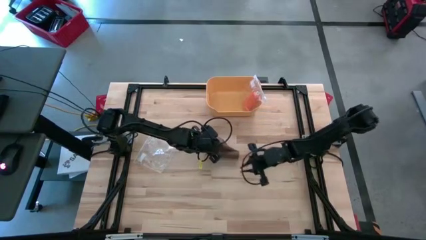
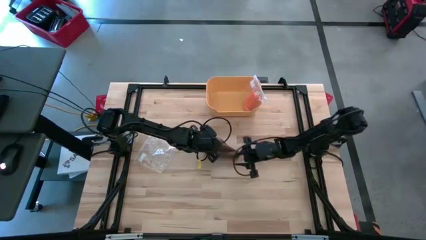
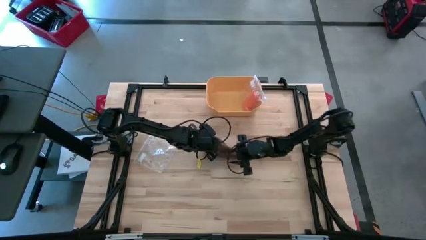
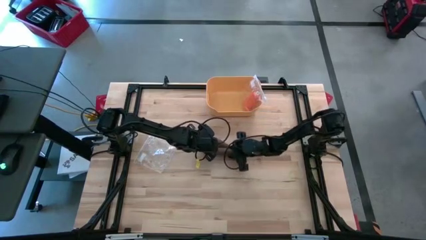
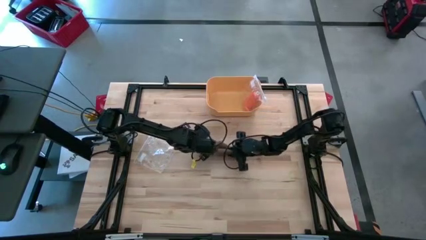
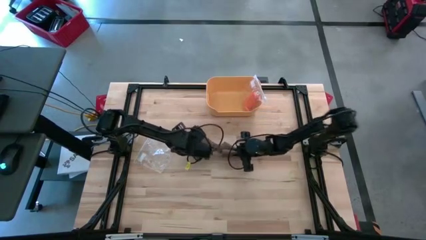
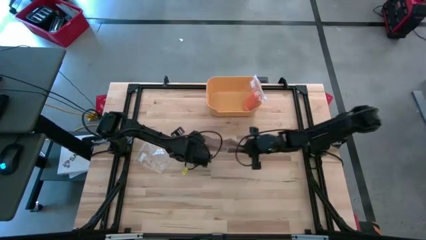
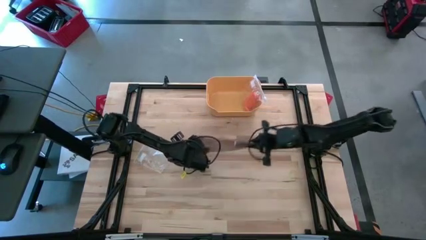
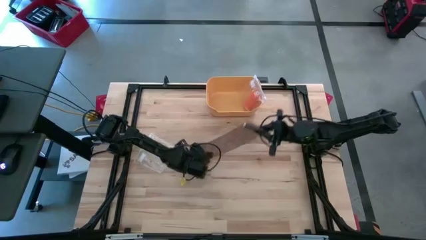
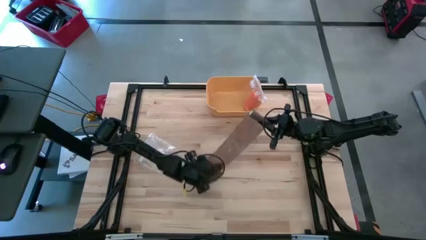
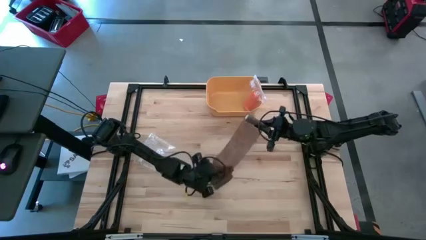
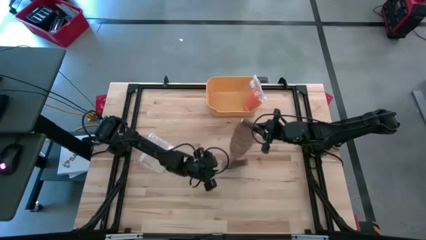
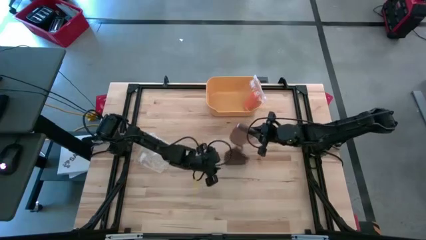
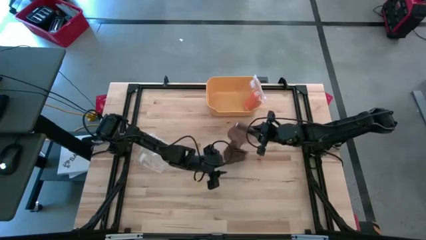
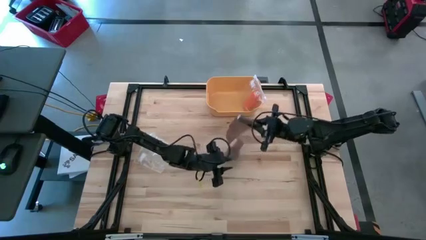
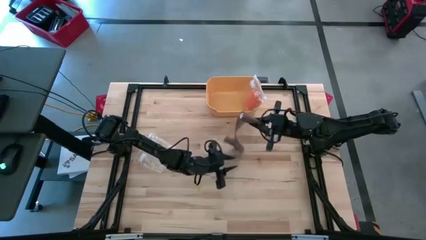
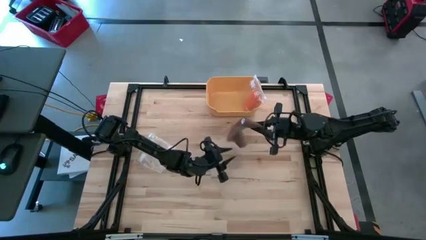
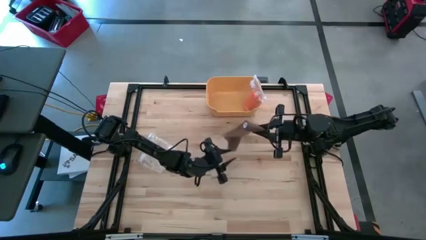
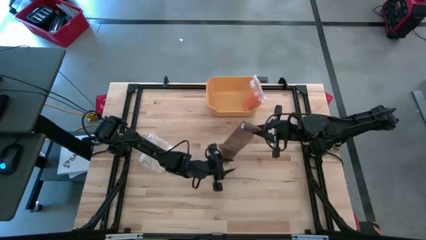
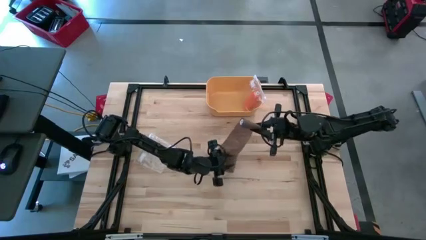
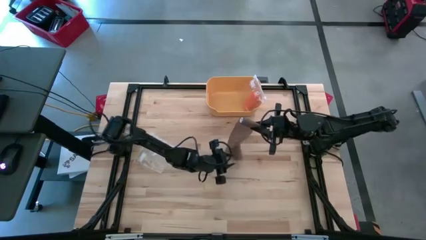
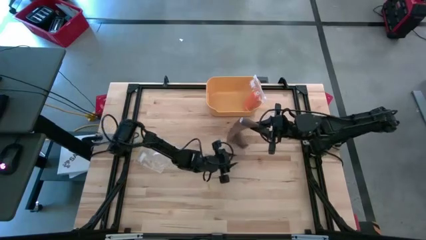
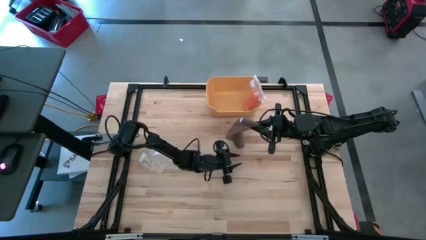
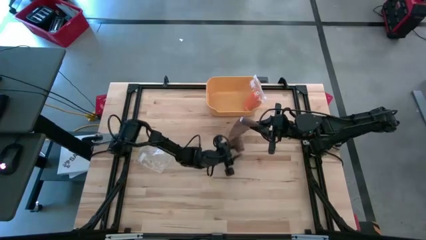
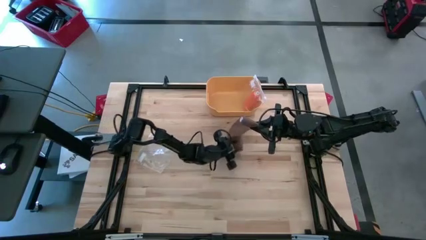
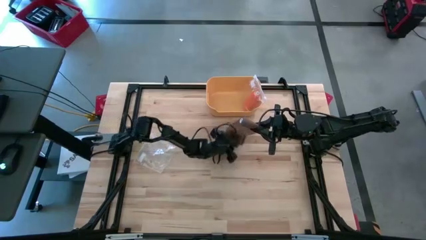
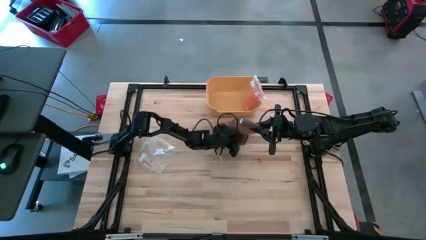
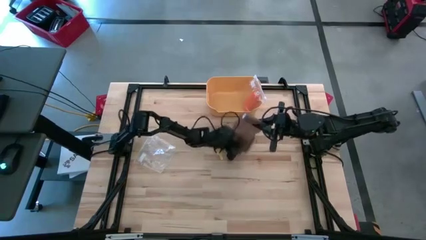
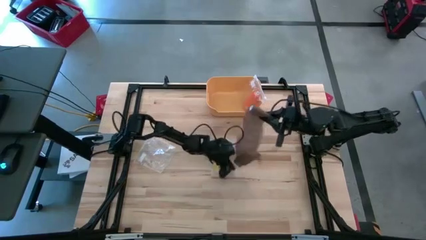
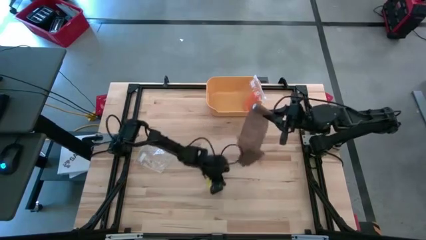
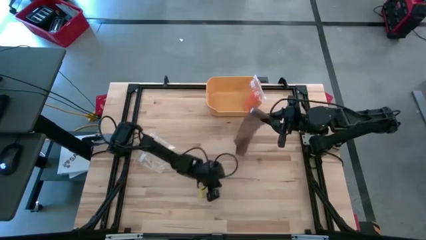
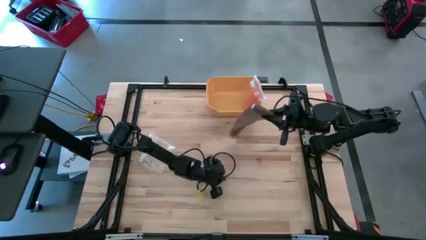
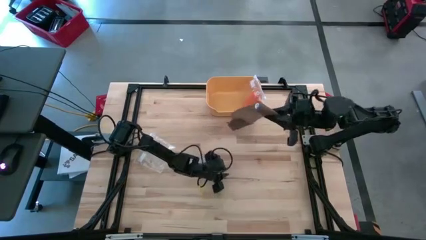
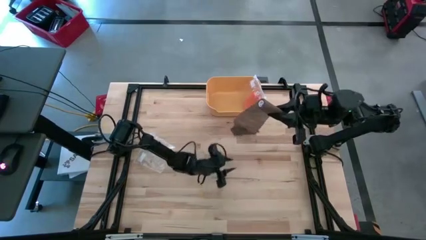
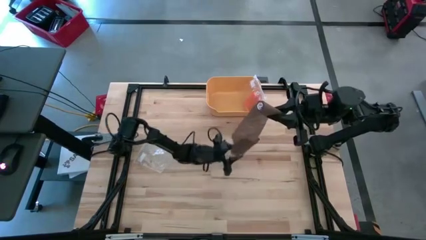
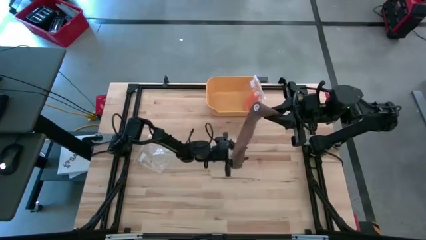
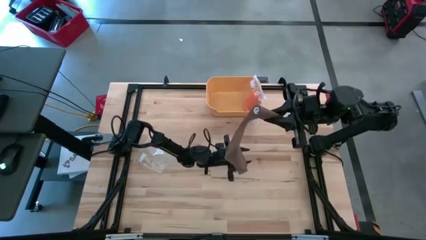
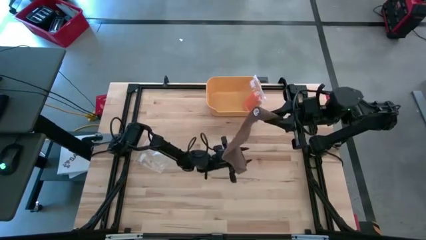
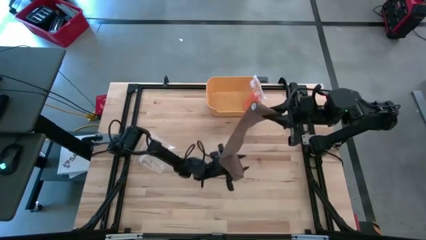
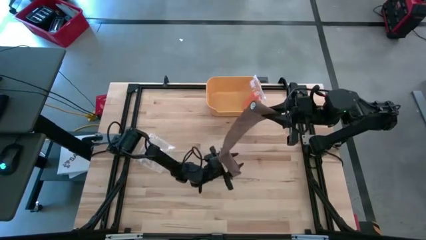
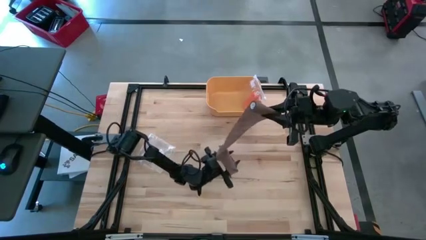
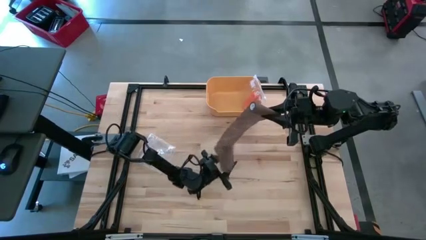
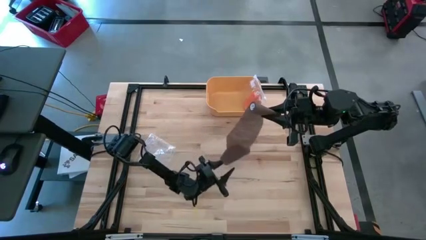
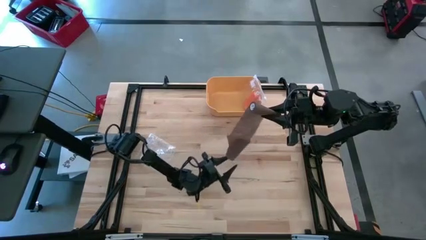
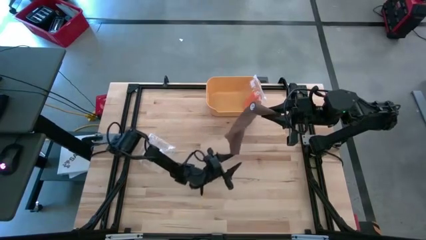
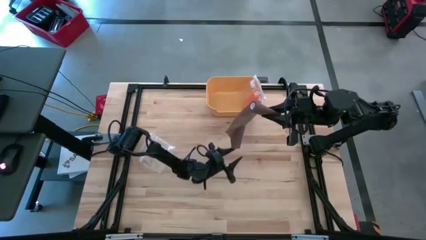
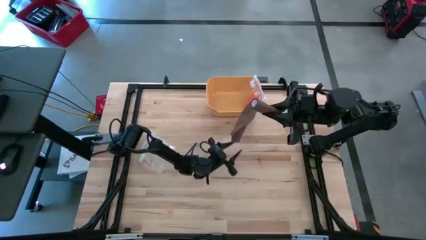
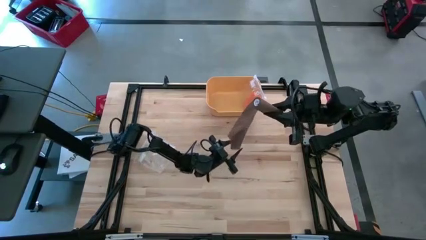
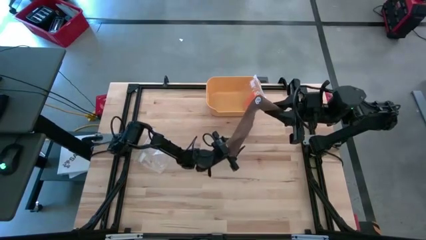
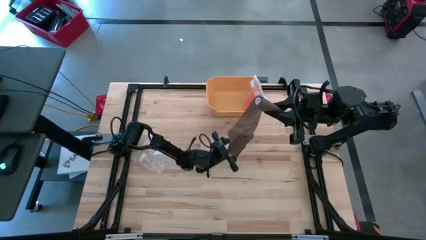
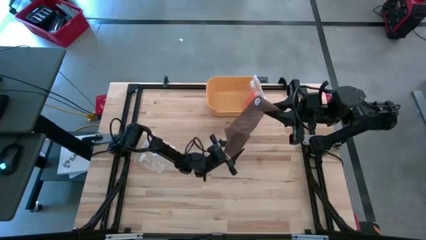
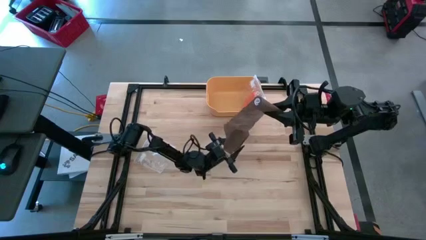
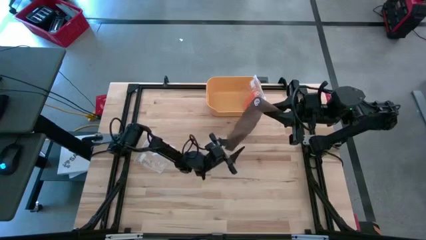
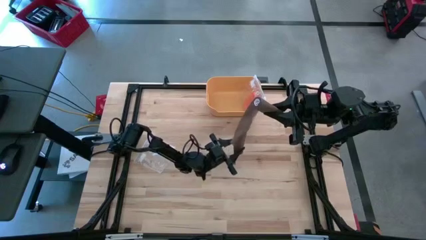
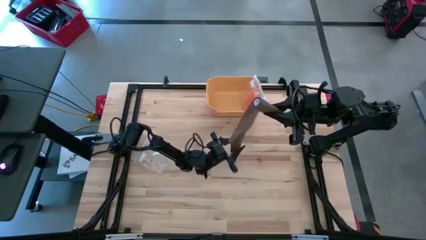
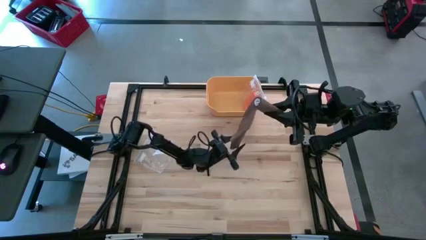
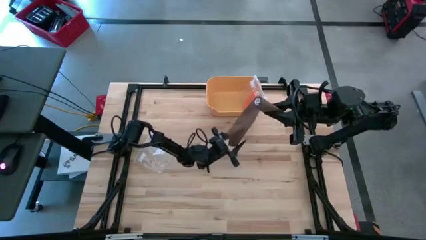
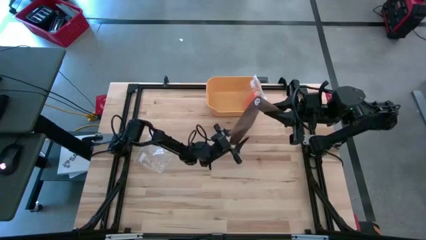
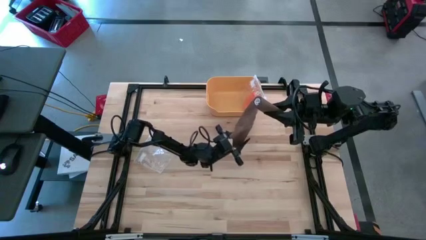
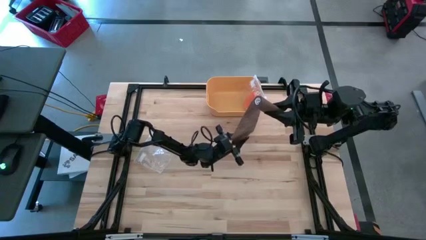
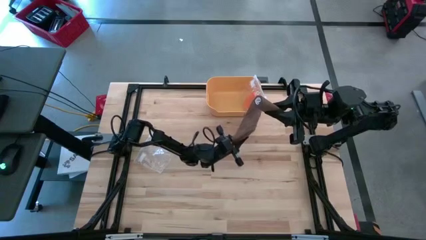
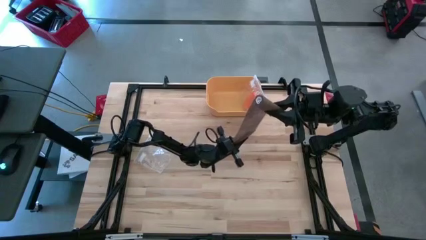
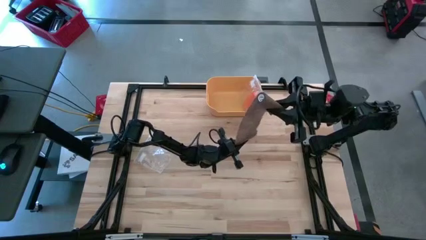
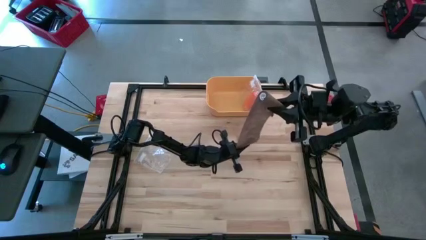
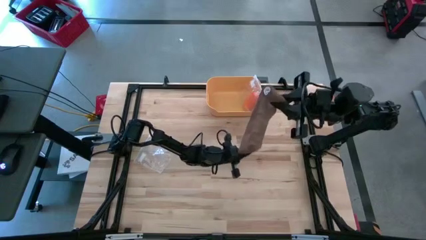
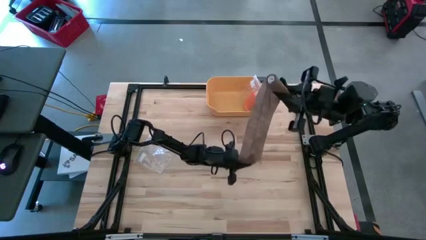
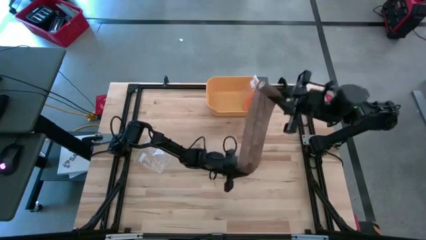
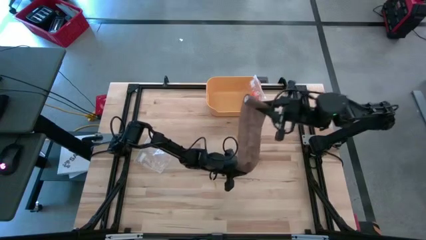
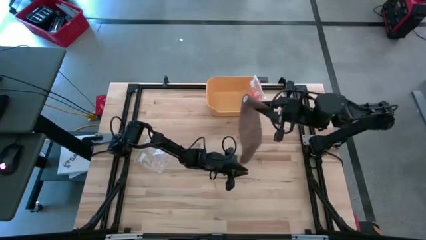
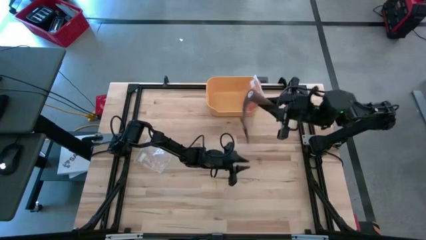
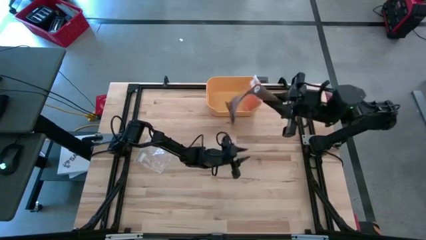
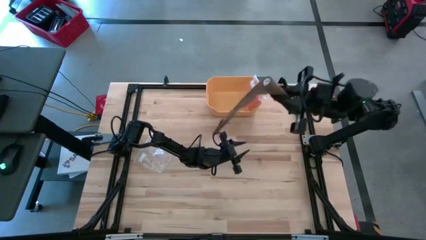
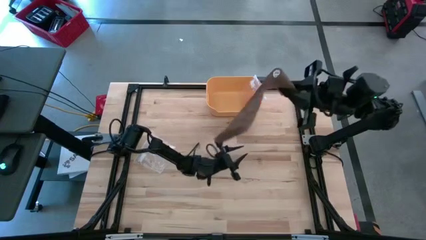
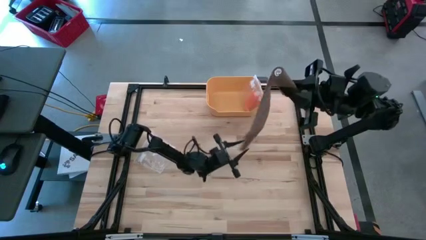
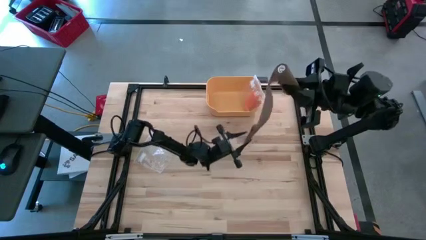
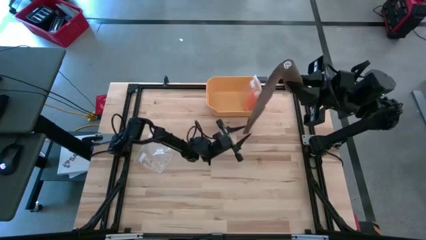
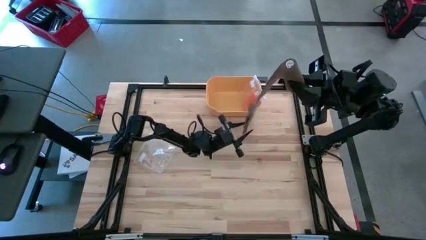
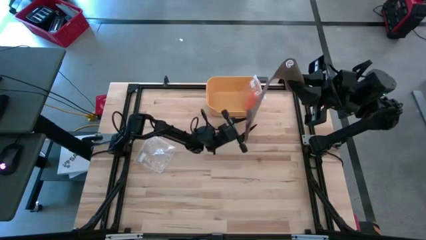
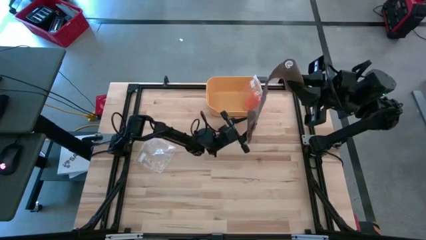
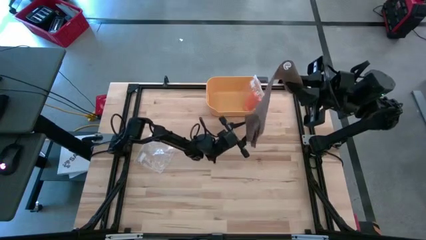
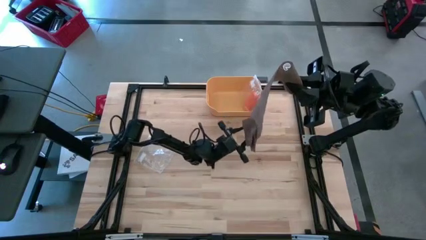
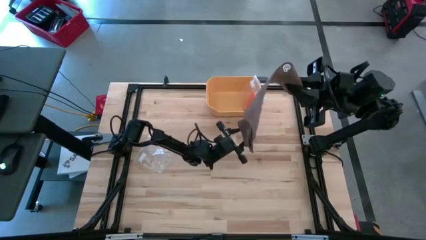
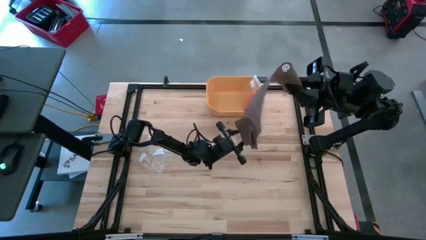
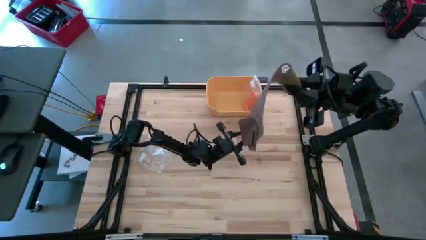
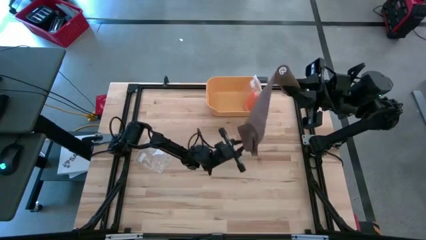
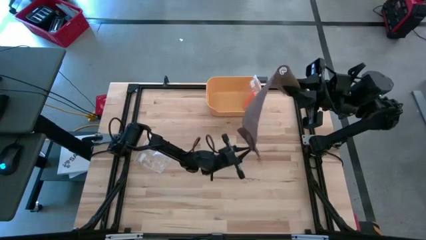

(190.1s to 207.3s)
Task: Roll bandage
Roll the brown bandage
